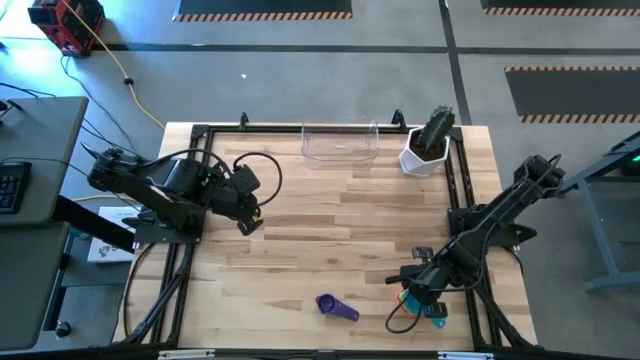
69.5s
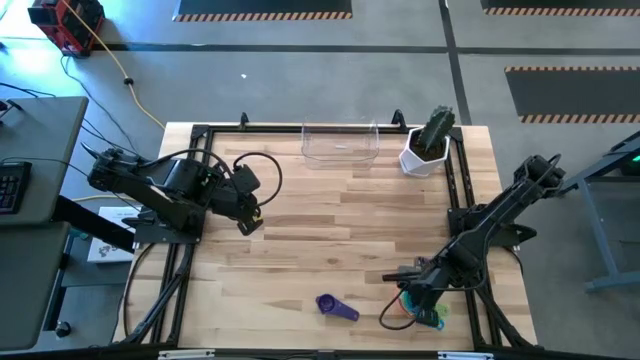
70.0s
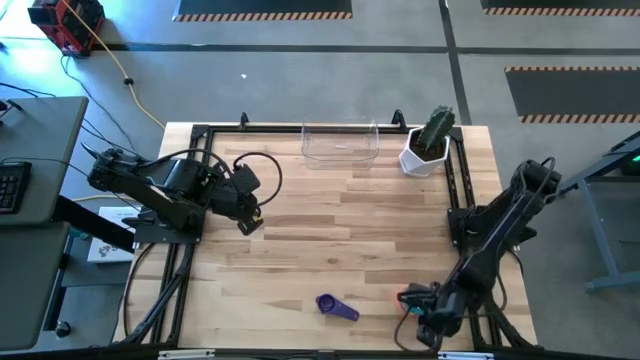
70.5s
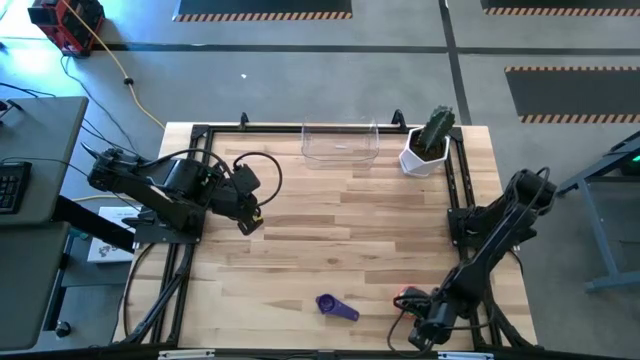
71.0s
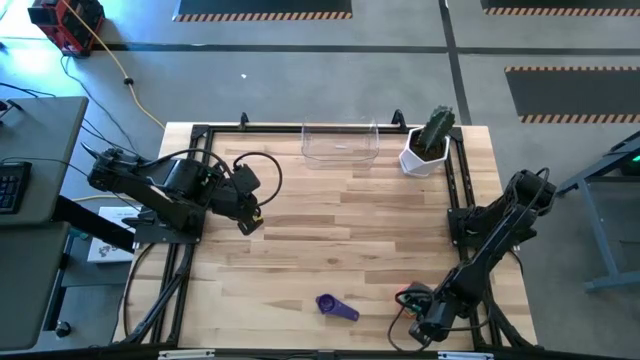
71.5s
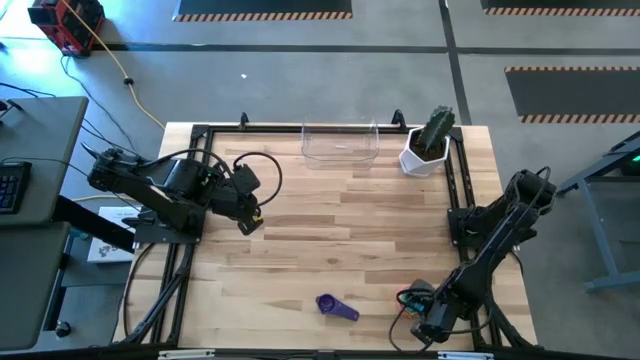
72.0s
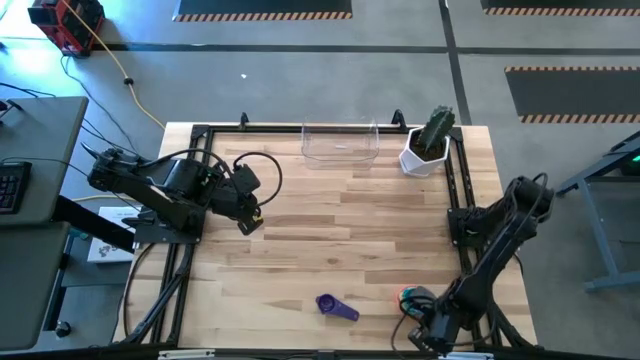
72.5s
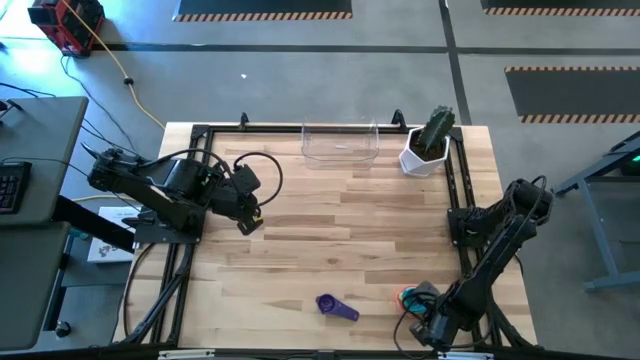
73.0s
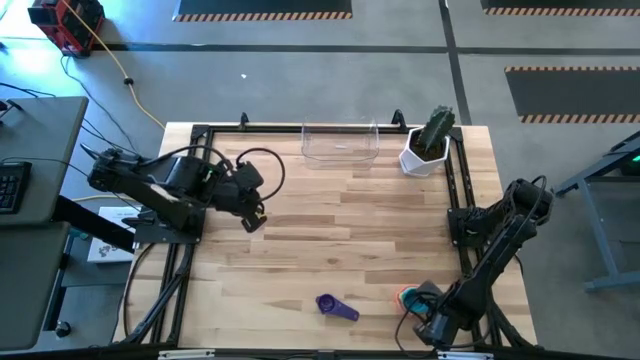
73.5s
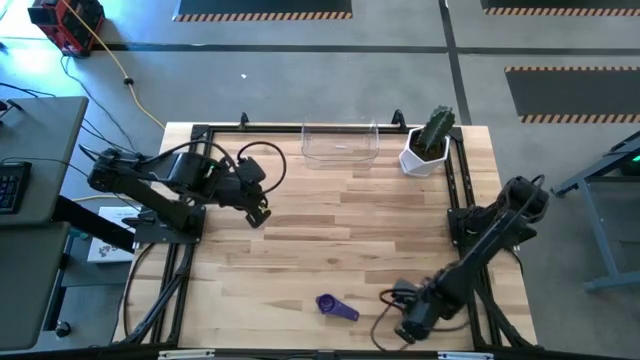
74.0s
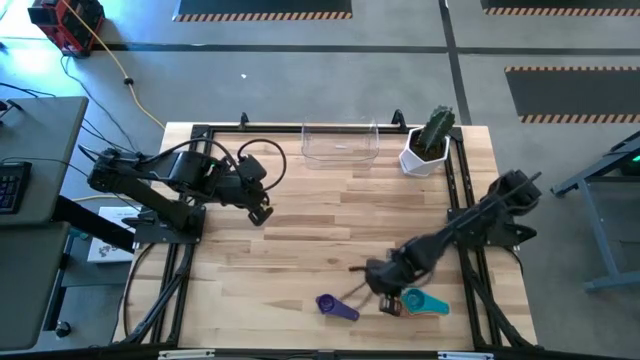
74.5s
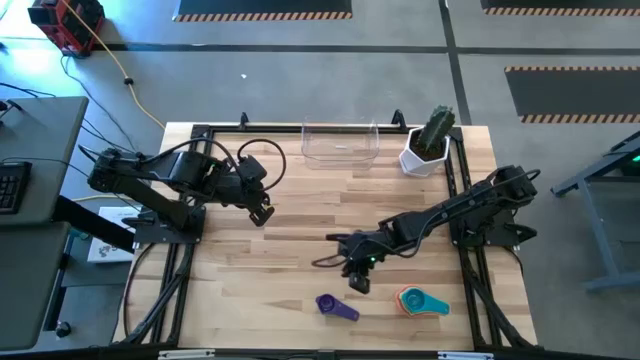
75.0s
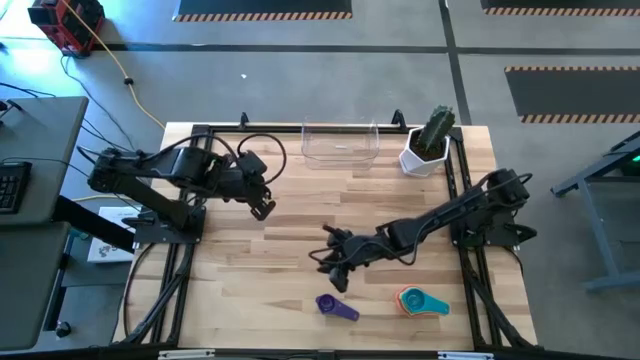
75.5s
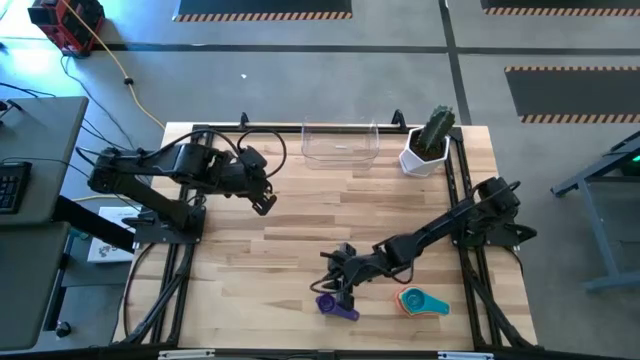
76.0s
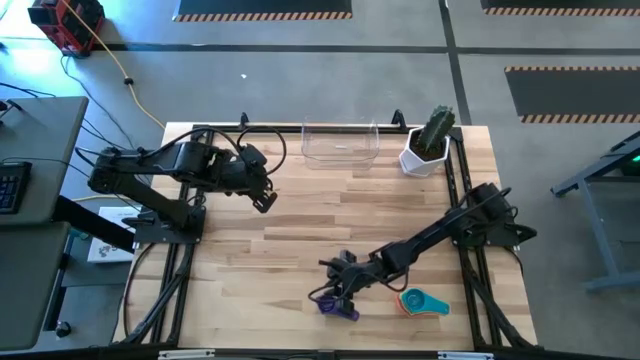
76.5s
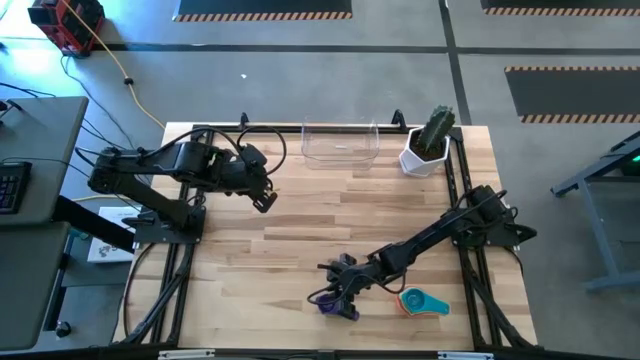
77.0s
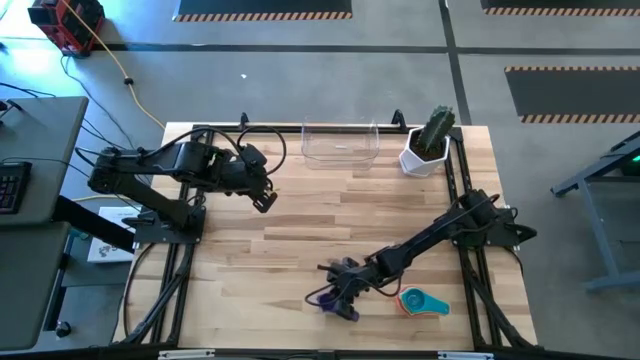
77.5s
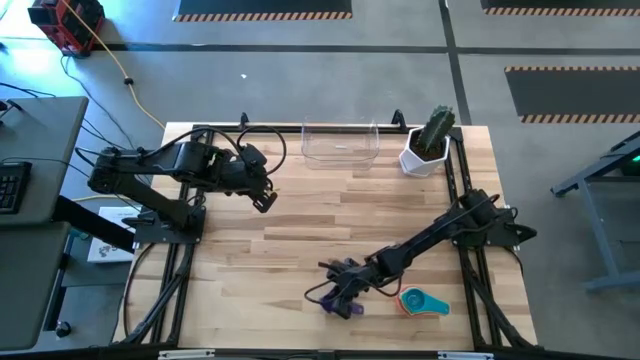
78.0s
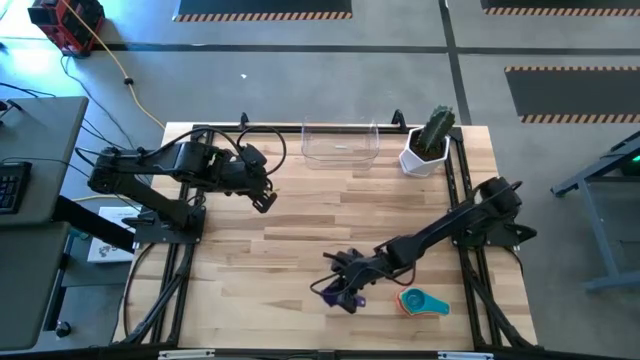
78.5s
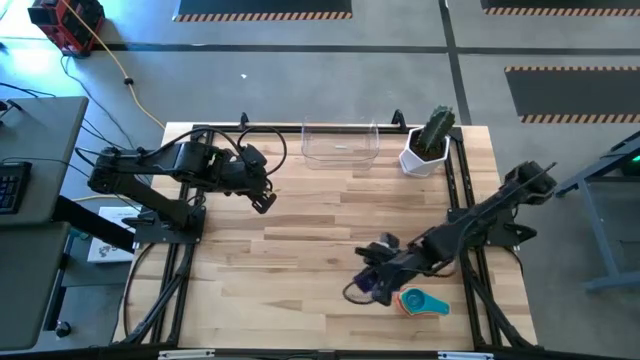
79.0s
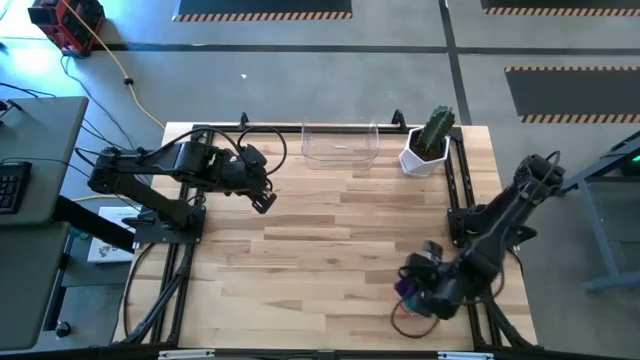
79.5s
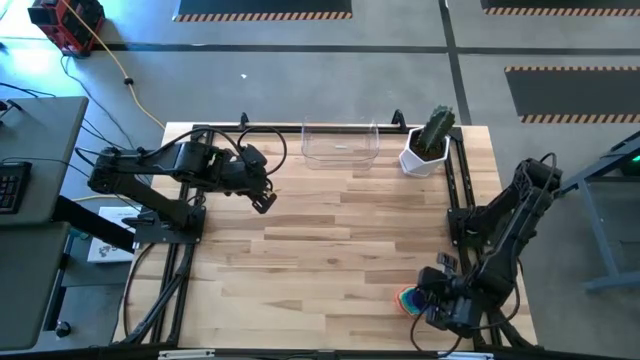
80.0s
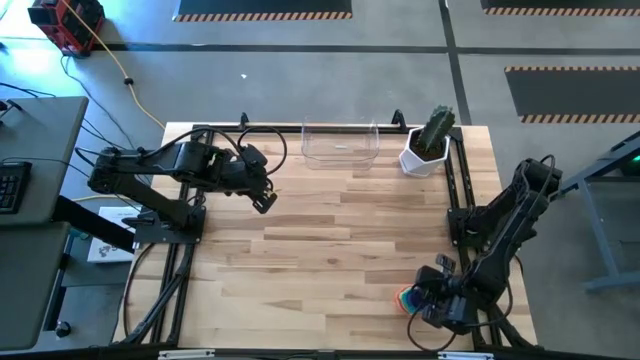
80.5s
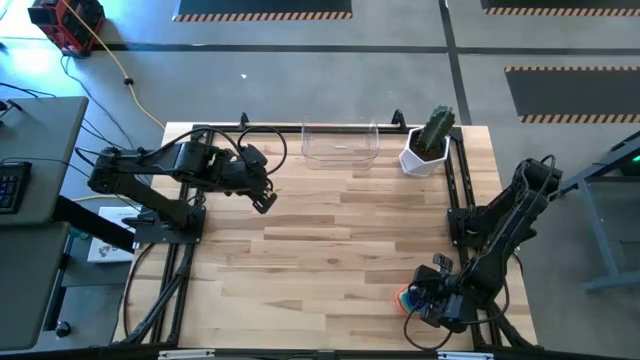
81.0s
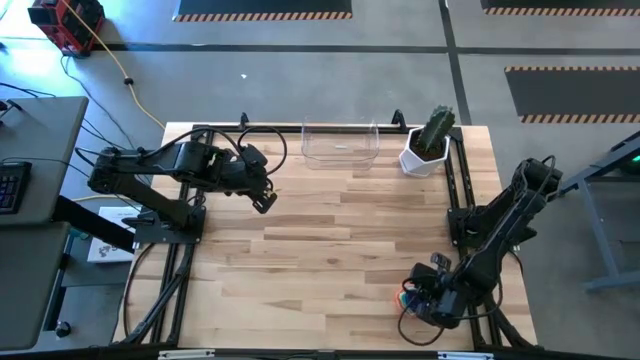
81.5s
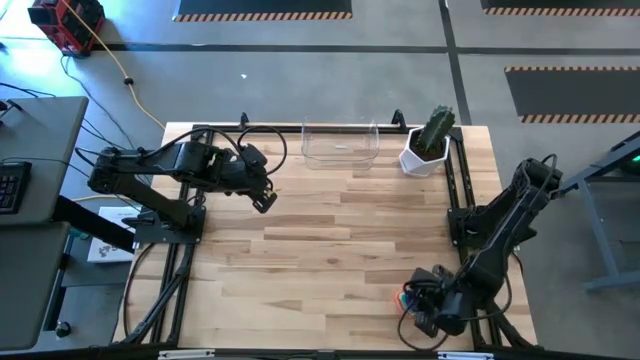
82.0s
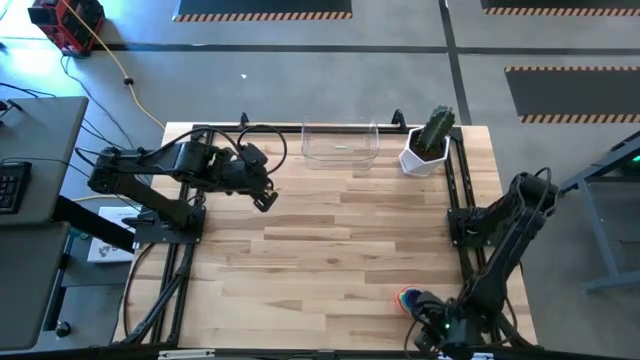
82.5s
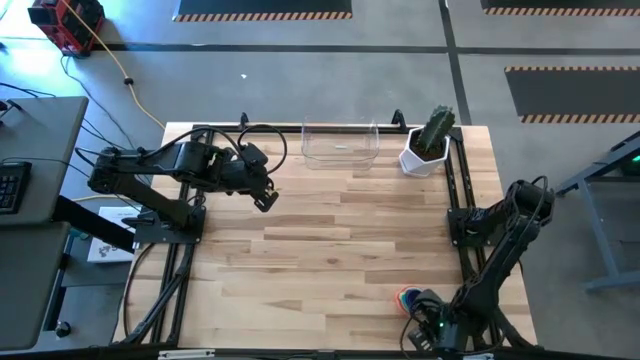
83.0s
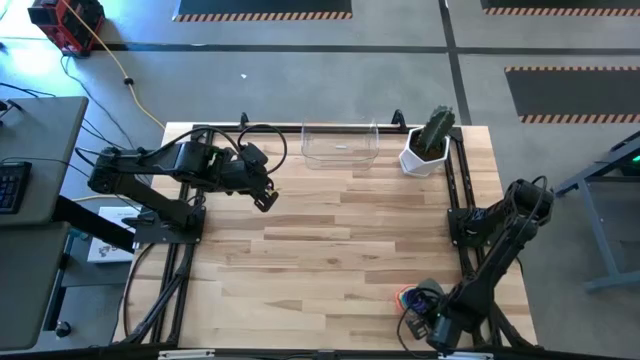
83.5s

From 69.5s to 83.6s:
Task: Nest measuring cups in basket
Stack the purple measuring cup on the top of the light blue measuring cup

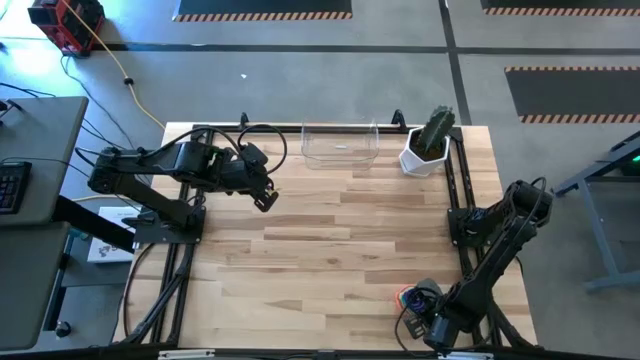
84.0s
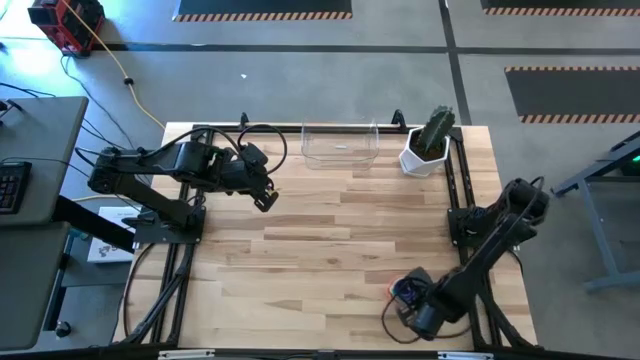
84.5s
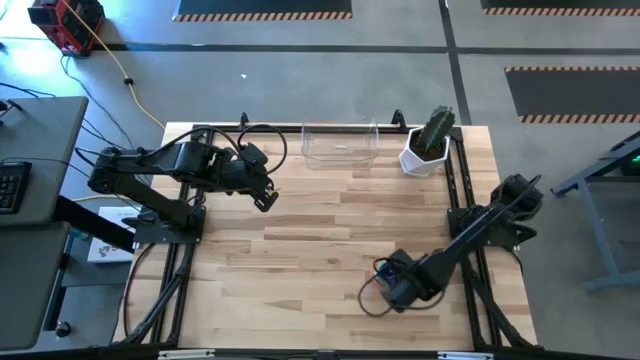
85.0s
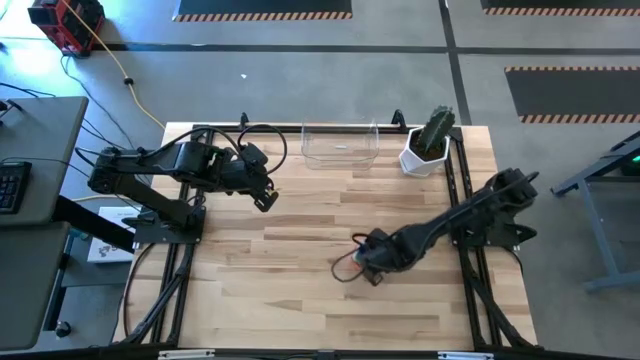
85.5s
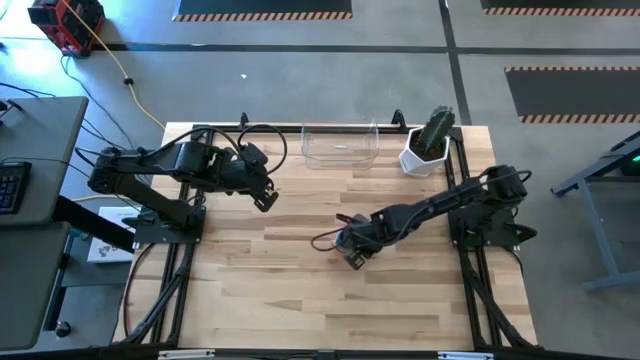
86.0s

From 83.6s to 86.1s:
Move the measuring cups to the center of the table

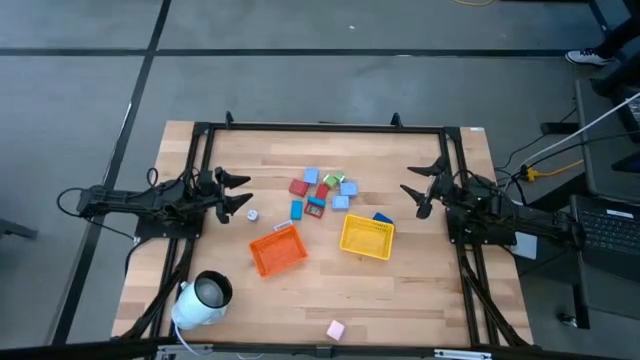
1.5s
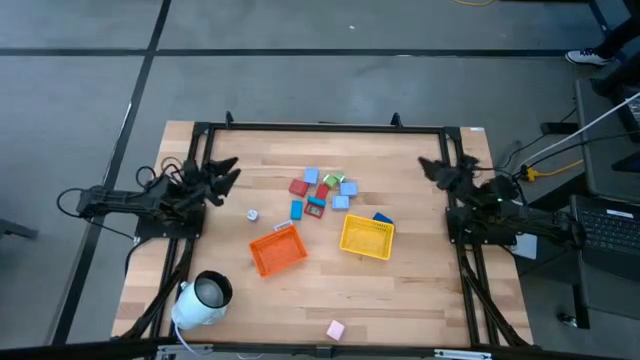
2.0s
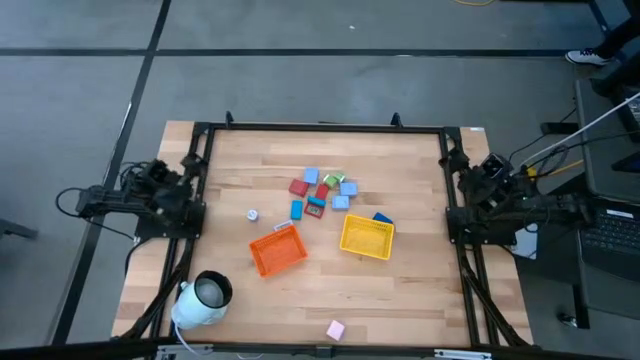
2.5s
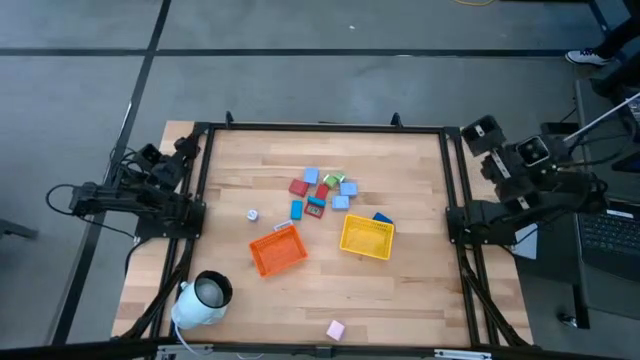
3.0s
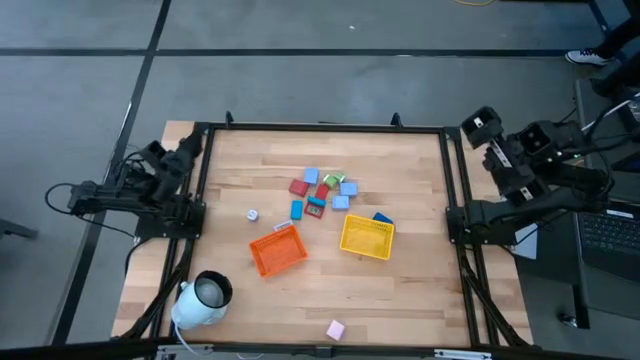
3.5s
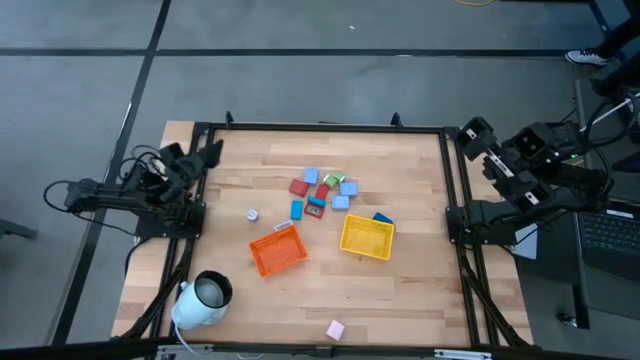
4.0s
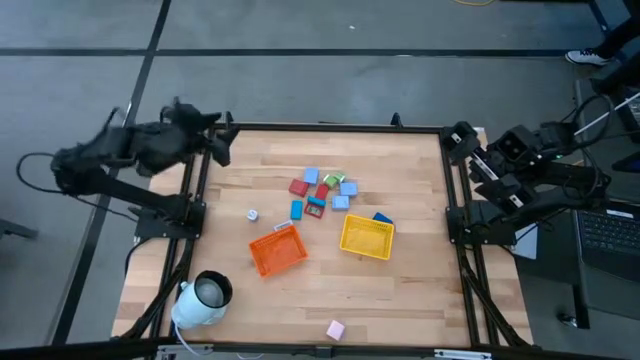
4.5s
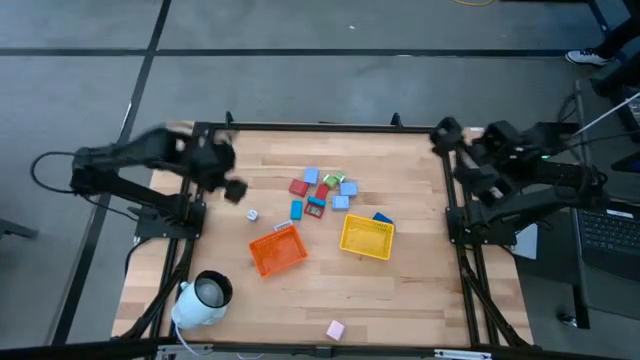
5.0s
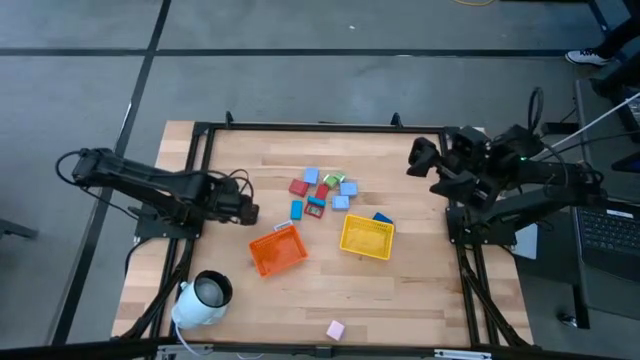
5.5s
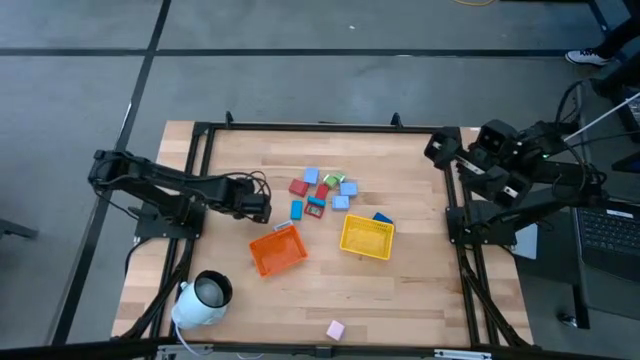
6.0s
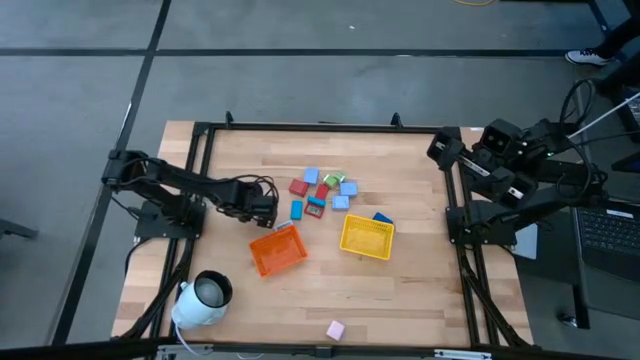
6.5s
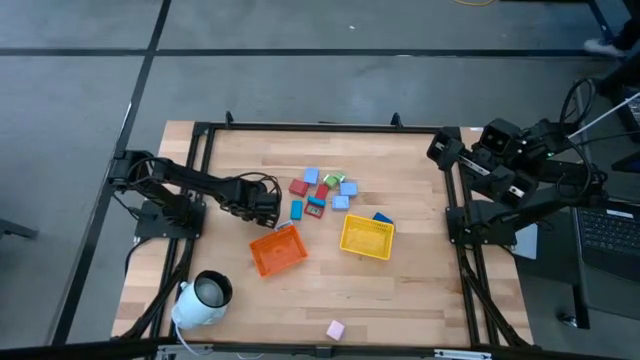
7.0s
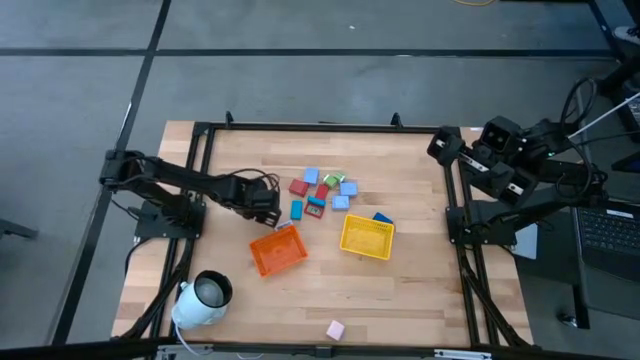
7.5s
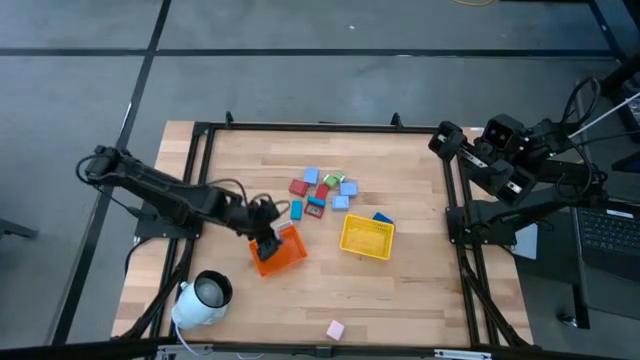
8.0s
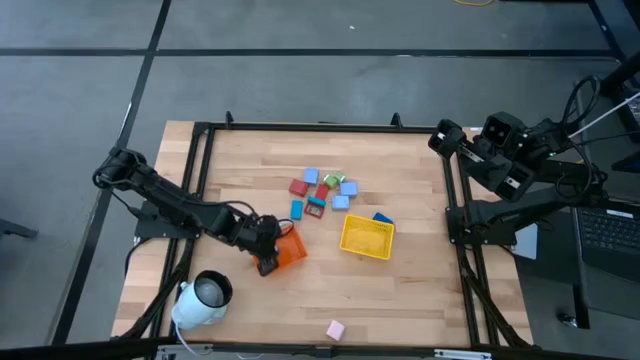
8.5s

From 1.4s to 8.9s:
Task: Pick & Place Office items
Put the violet charger adapter into the orange bin
